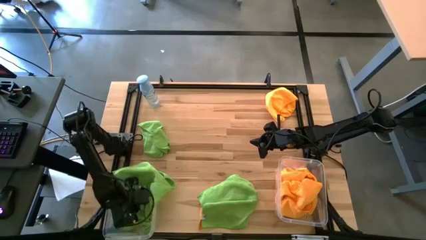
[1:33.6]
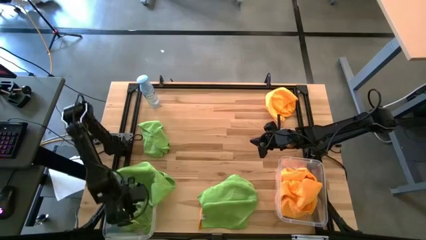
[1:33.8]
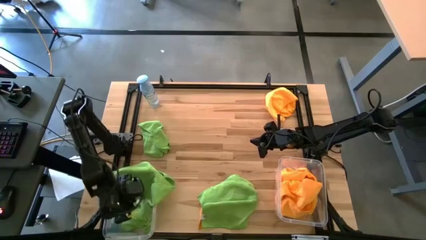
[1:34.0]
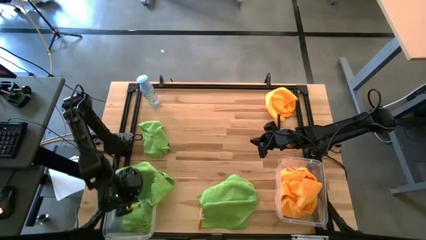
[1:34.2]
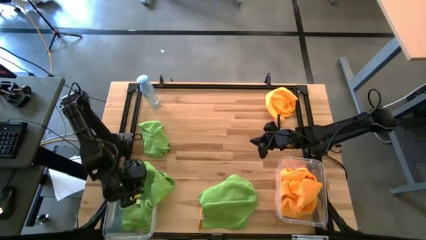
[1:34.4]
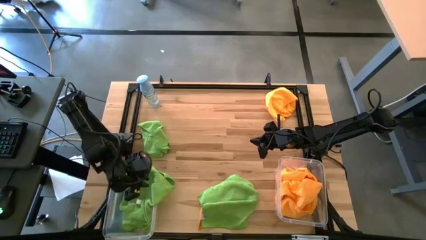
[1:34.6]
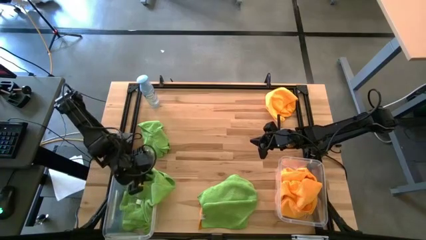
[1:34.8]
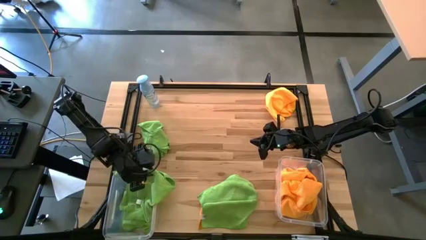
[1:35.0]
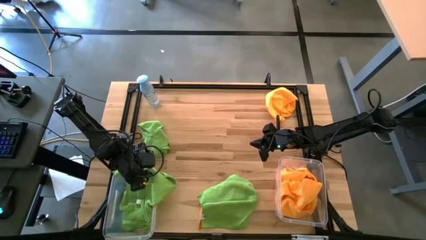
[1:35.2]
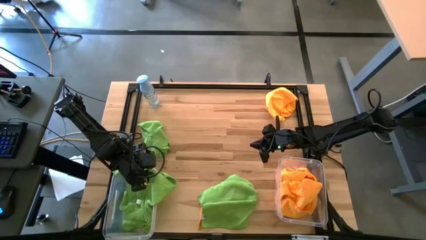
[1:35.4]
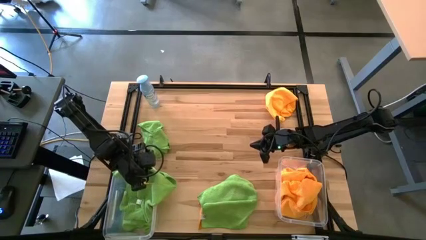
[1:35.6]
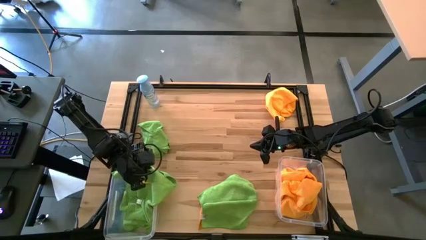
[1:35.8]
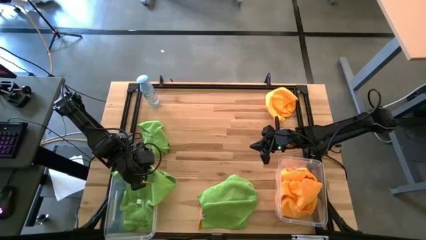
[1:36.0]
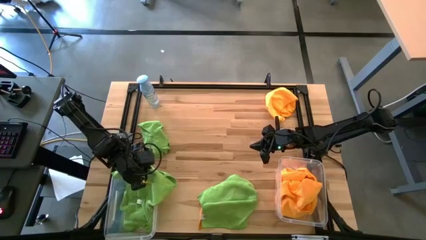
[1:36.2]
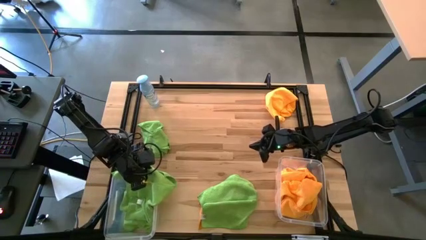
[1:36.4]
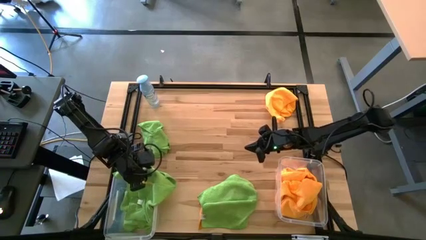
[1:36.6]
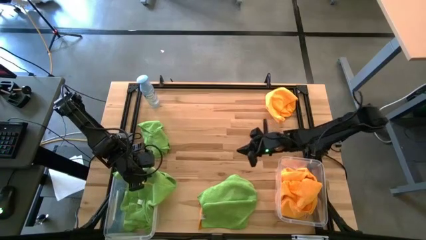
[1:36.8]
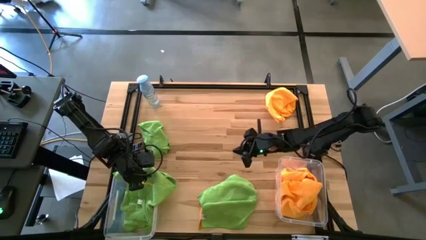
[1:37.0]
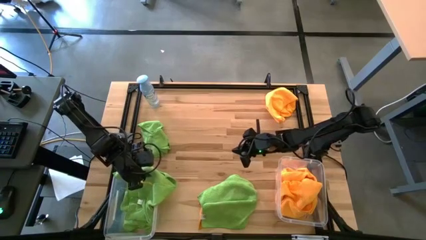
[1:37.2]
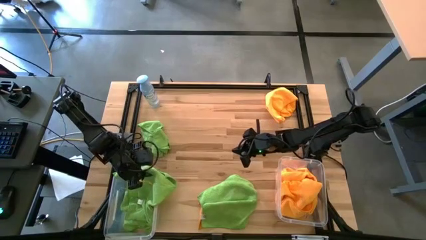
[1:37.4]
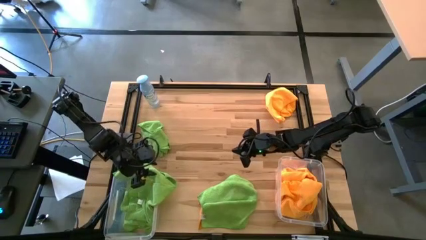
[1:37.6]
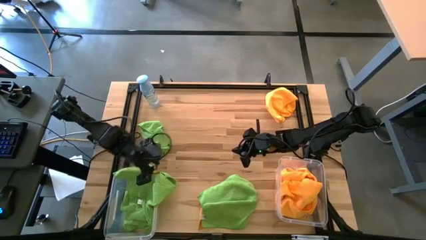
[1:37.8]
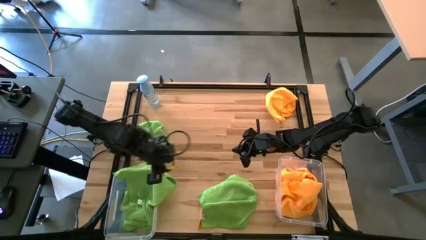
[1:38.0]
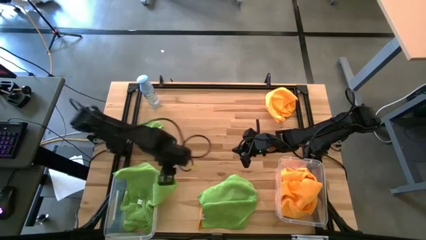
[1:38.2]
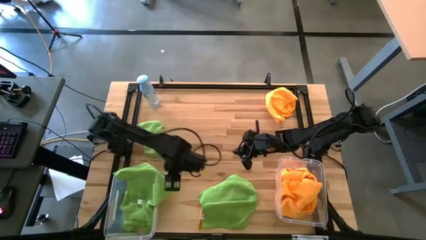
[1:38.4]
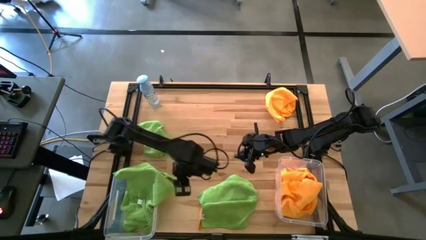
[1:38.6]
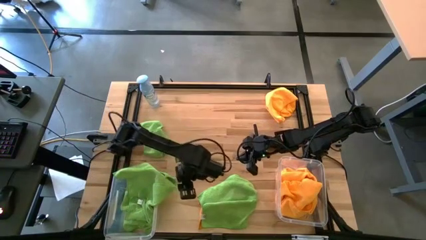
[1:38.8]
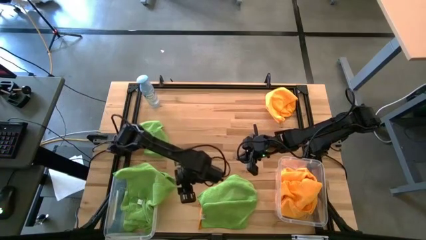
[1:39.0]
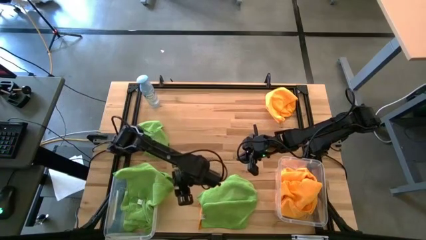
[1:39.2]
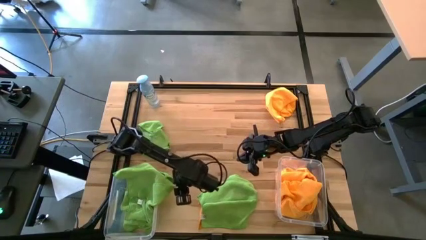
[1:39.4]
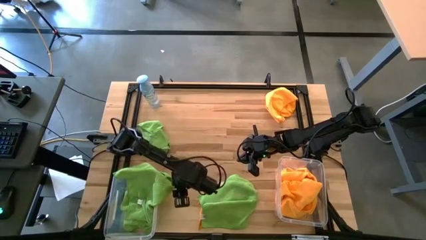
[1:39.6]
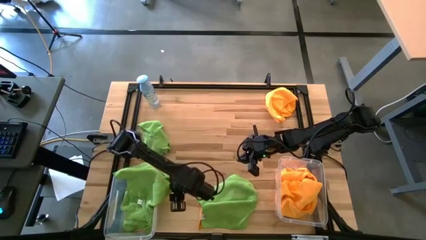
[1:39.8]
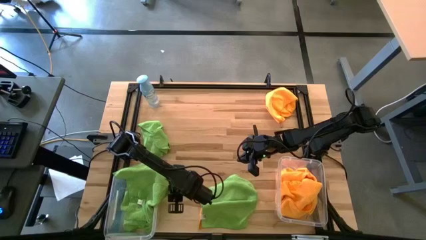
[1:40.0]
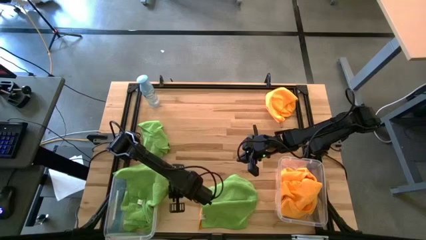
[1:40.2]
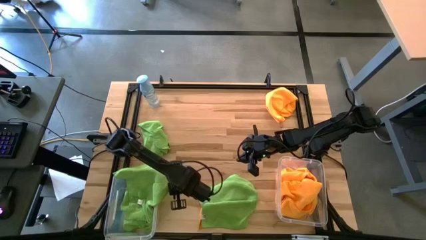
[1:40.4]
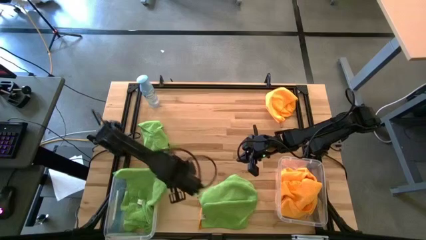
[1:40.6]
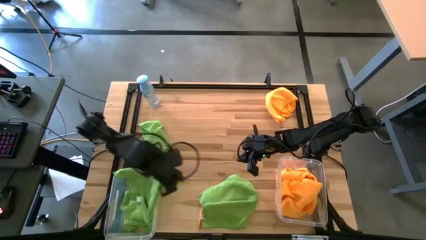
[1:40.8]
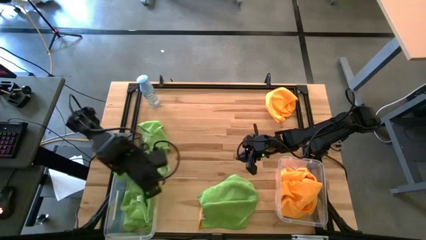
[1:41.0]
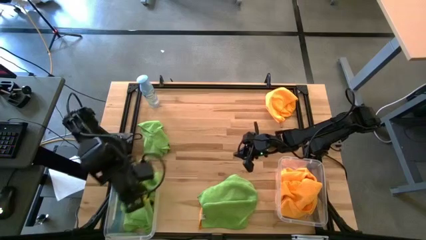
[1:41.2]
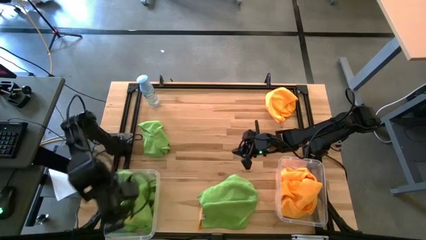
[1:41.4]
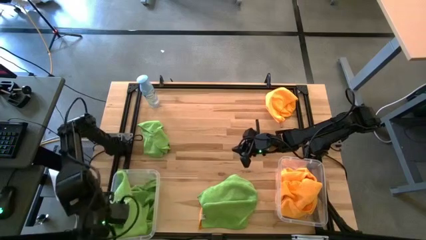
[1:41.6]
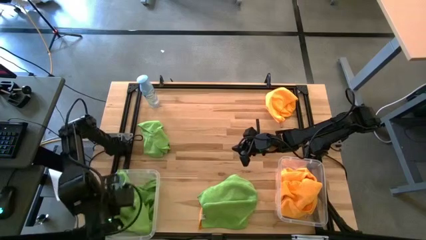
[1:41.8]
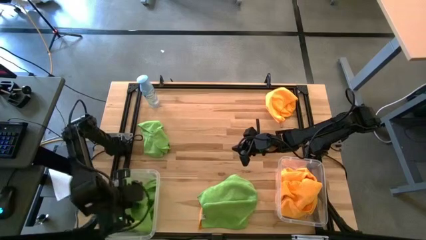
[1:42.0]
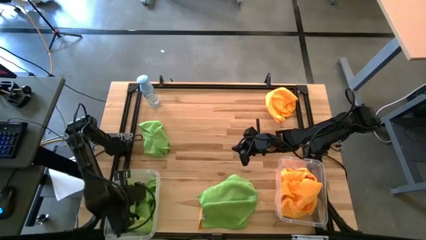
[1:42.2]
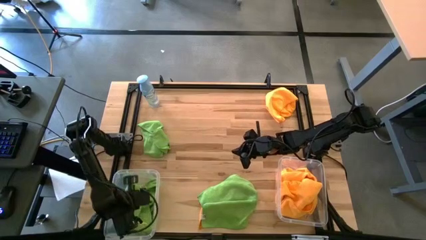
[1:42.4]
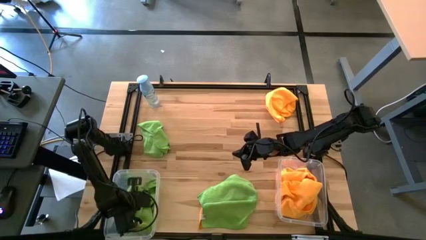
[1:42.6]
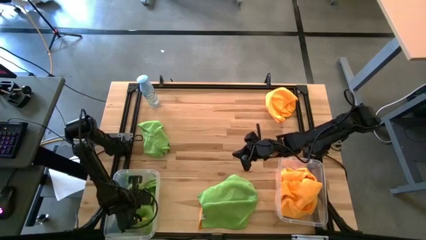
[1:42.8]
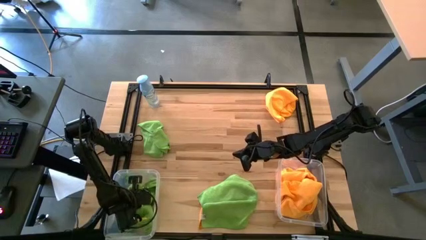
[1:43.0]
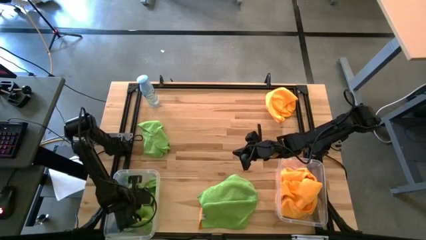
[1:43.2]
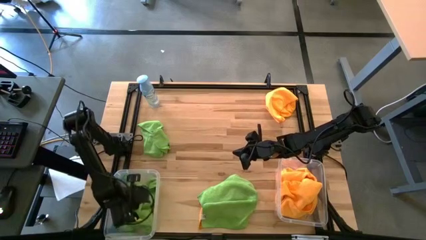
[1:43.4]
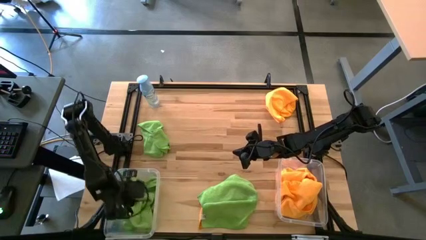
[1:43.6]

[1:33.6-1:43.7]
Task: Sort microfiber towel by color & place in baskets
Put the green towel into the left transparent bin

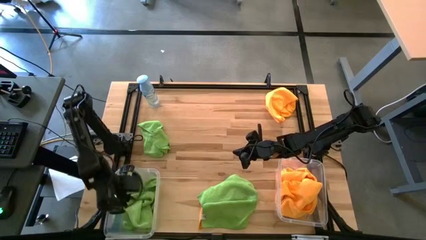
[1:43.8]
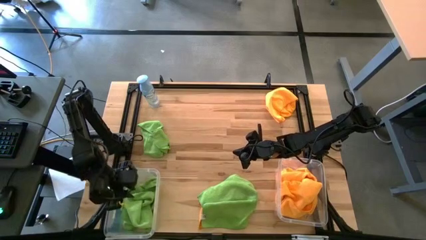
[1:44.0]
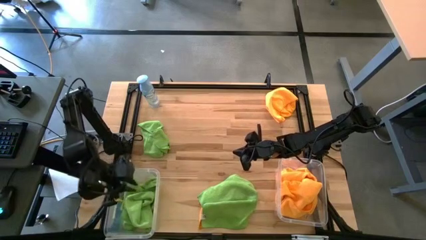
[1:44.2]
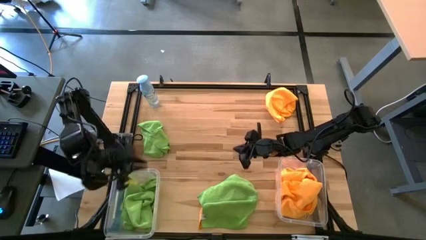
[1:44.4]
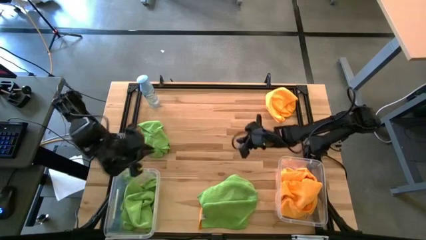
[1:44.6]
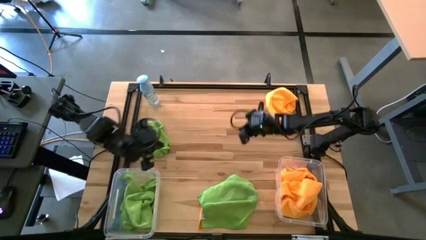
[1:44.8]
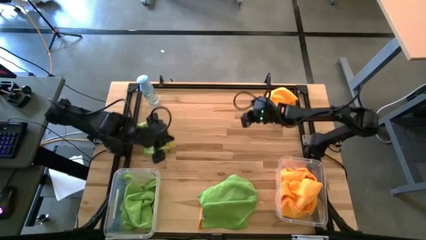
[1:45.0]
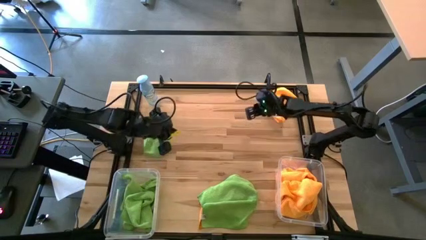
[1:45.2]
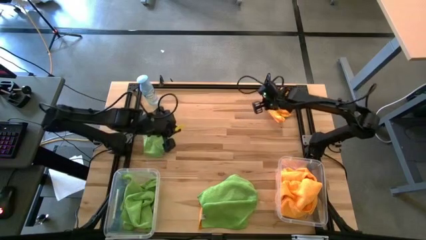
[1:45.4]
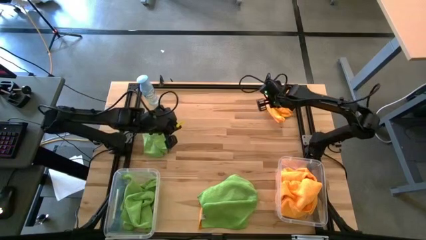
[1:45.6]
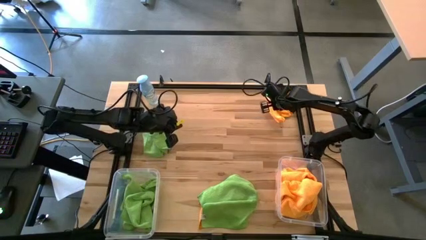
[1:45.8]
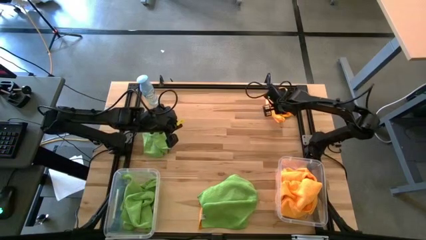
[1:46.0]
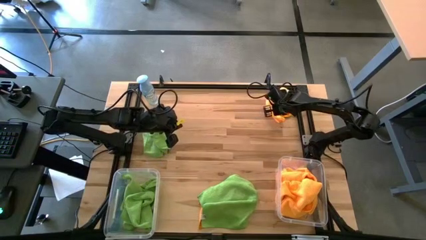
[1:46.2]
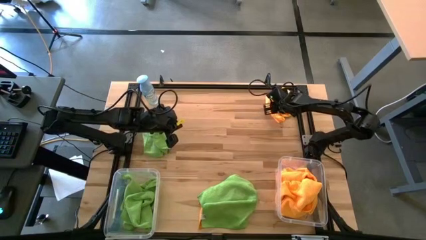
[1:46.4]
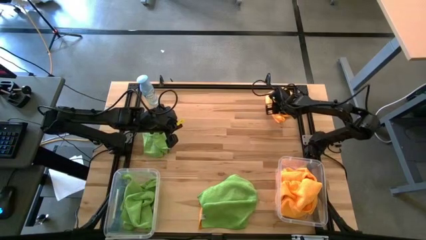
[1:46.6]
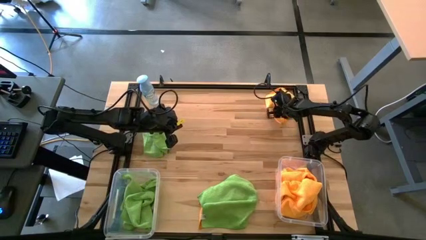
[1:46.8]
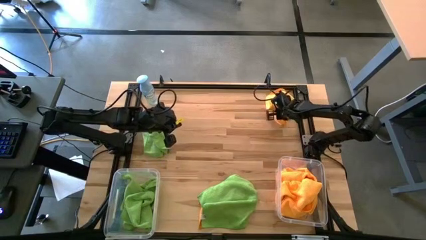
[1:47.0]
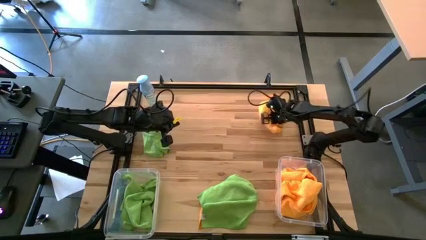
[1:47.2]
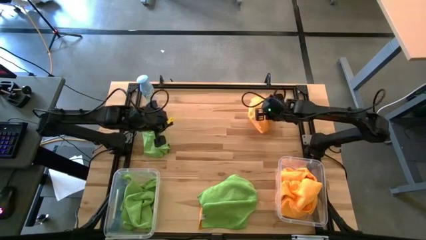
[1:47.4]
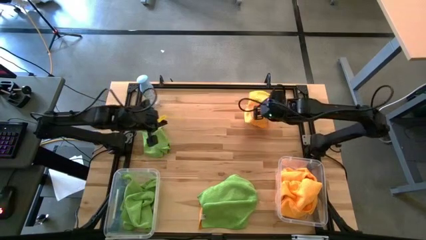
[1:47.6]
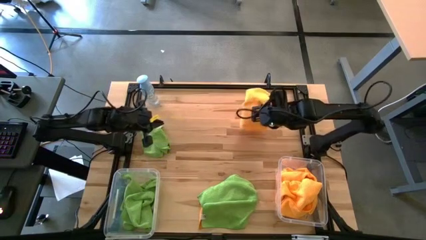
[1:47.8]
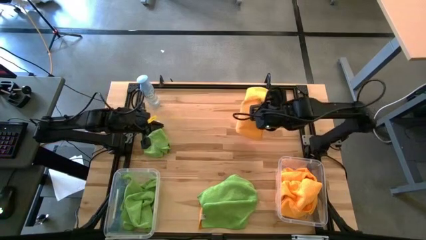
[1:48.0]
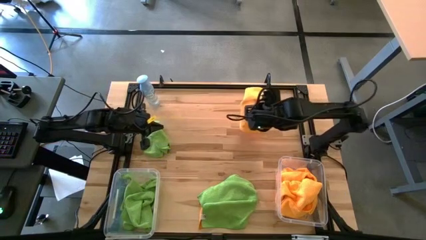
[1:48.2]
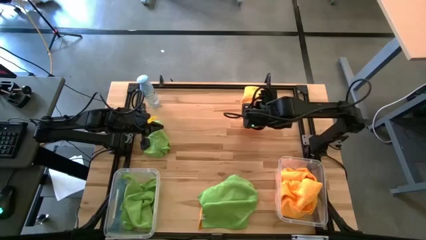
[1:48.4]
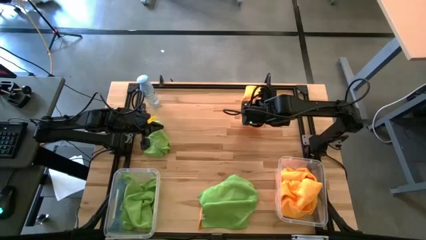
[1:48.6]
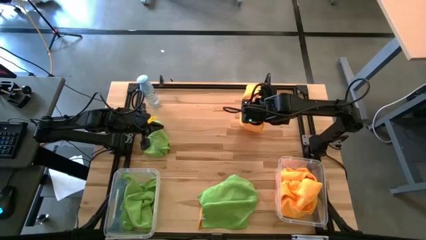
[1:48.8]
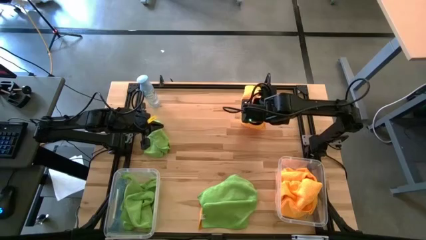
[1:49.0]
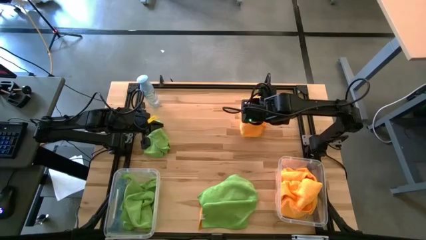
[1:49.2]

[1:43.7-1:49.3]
Put the yellow towel into the right transparent bin
